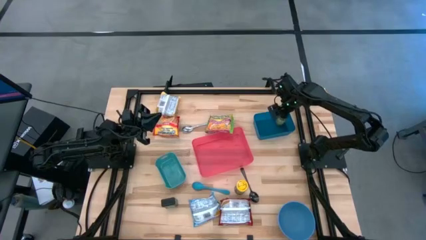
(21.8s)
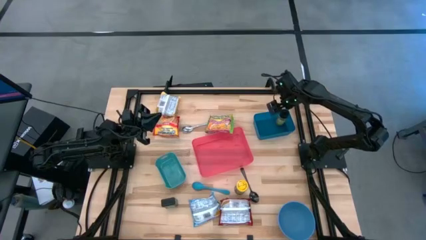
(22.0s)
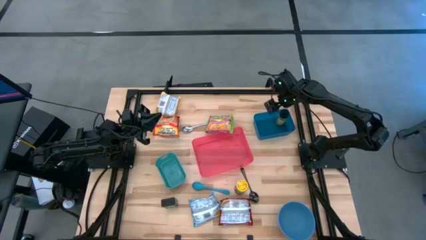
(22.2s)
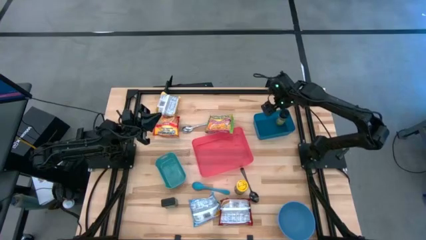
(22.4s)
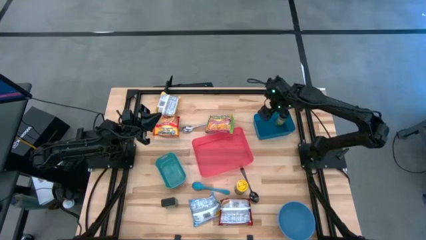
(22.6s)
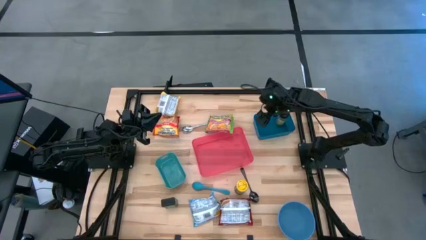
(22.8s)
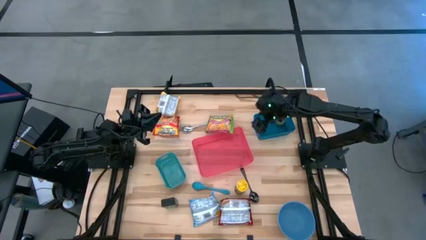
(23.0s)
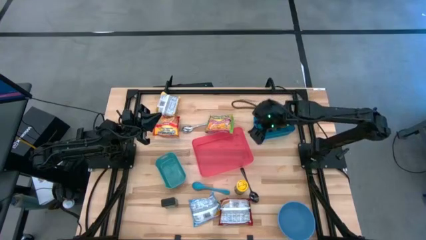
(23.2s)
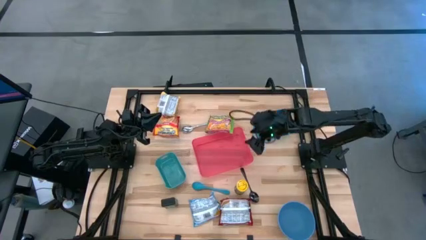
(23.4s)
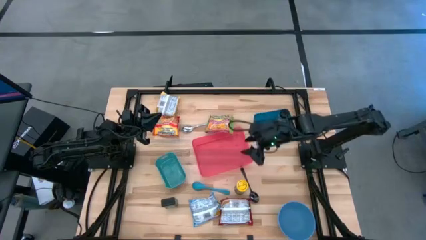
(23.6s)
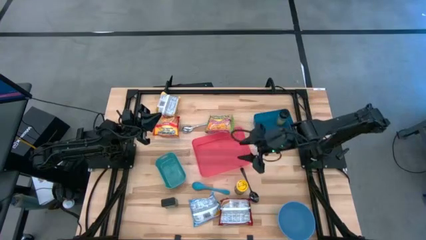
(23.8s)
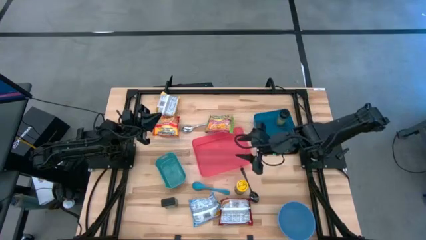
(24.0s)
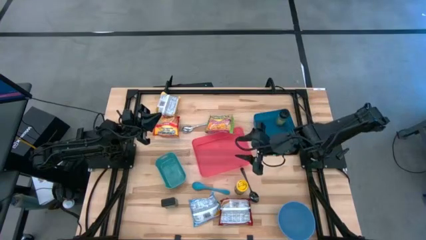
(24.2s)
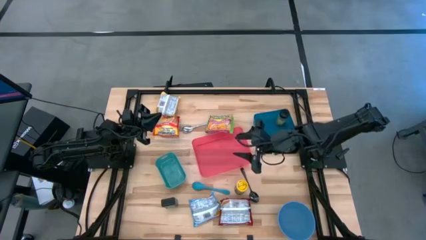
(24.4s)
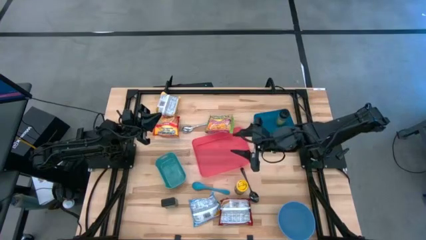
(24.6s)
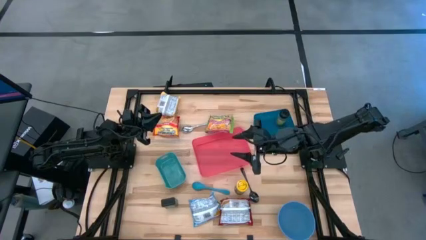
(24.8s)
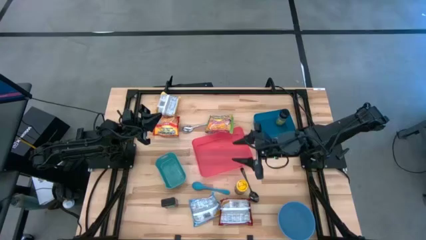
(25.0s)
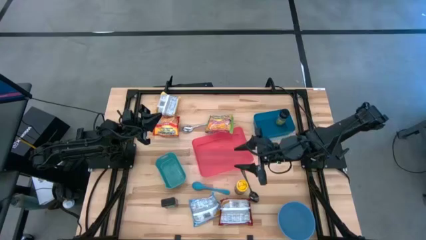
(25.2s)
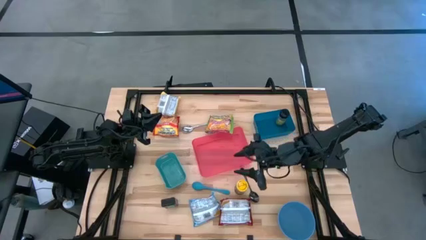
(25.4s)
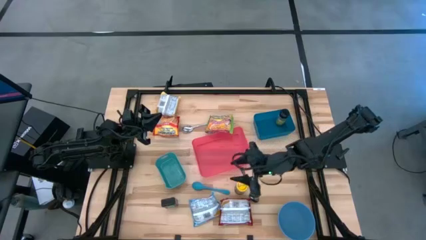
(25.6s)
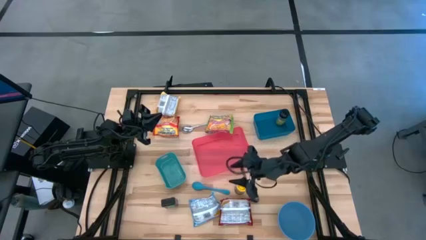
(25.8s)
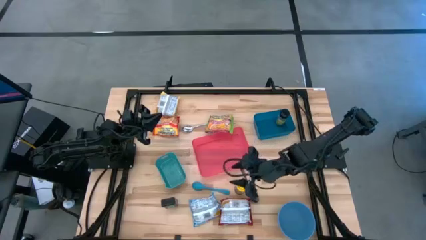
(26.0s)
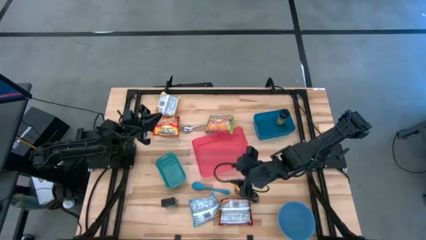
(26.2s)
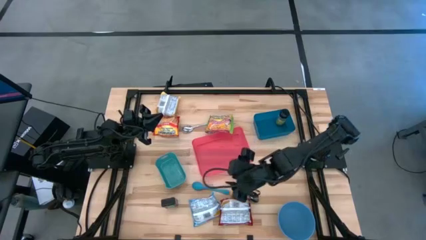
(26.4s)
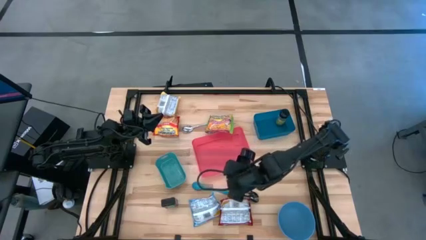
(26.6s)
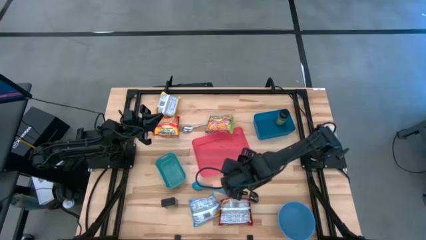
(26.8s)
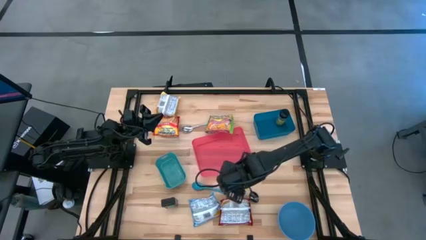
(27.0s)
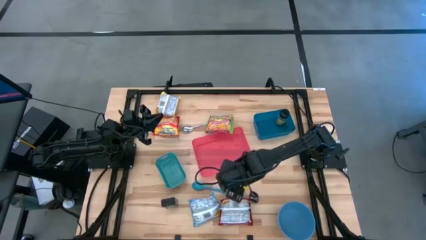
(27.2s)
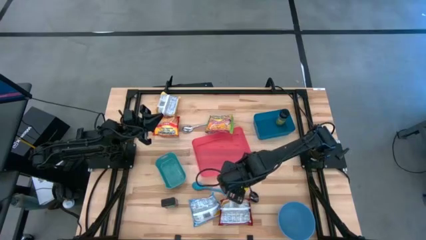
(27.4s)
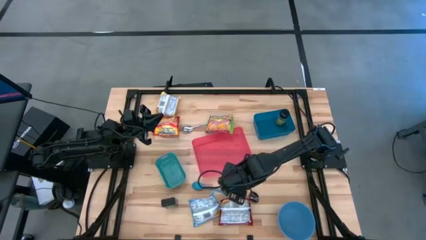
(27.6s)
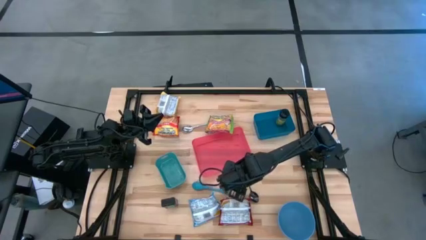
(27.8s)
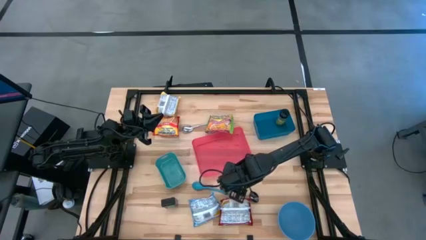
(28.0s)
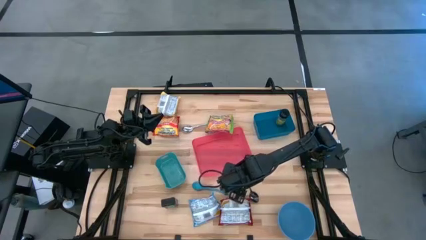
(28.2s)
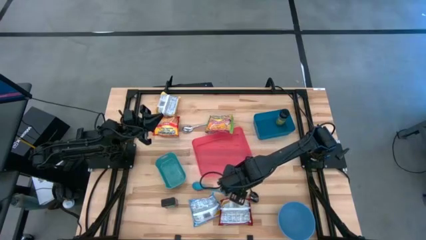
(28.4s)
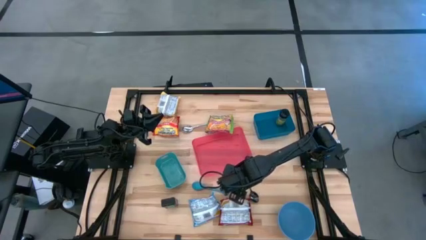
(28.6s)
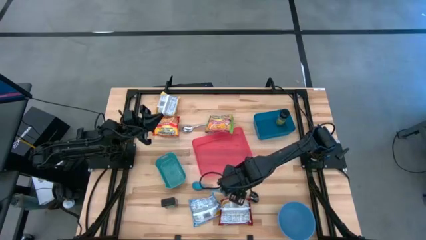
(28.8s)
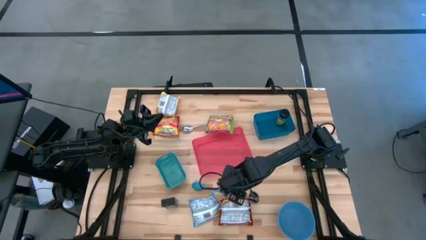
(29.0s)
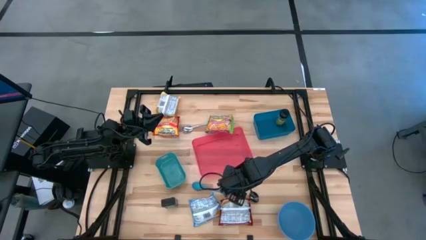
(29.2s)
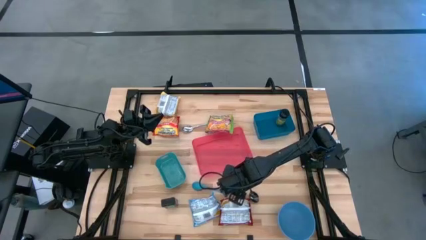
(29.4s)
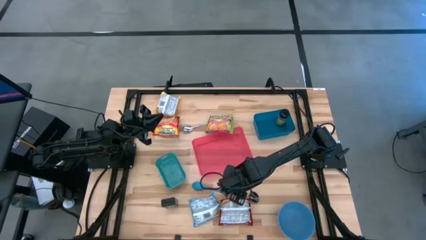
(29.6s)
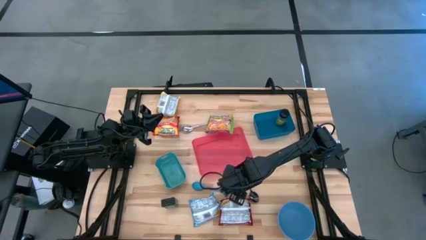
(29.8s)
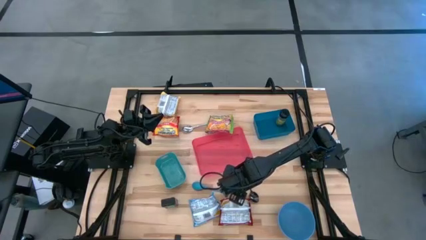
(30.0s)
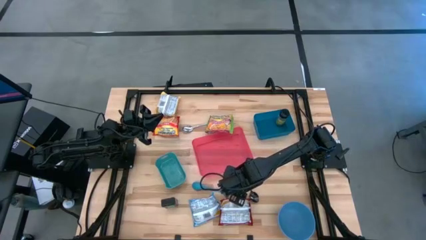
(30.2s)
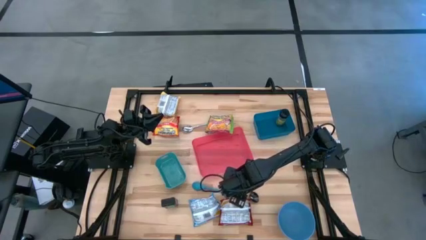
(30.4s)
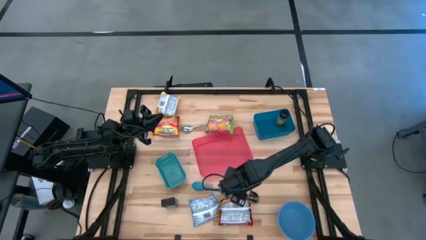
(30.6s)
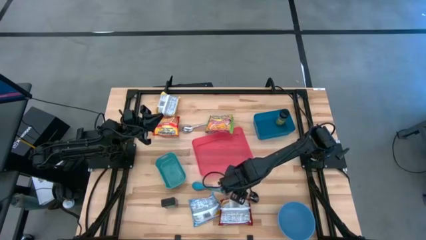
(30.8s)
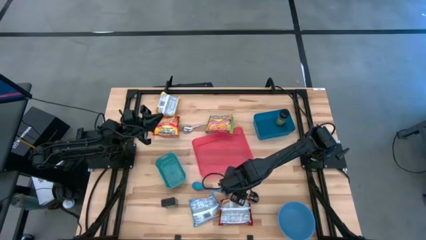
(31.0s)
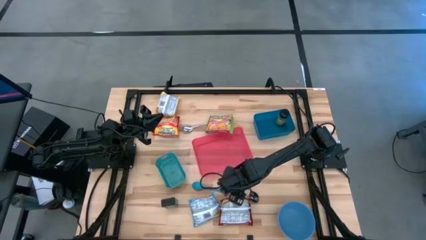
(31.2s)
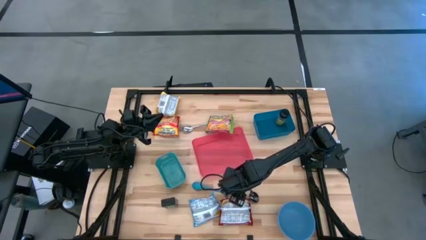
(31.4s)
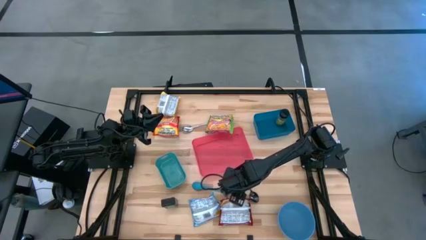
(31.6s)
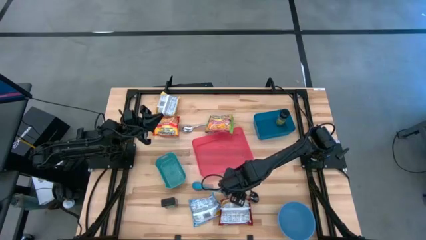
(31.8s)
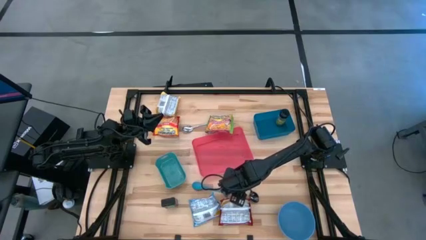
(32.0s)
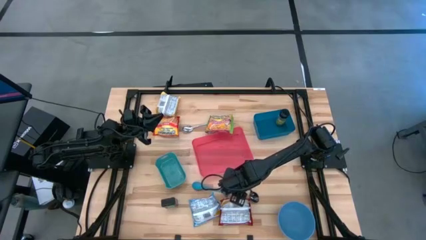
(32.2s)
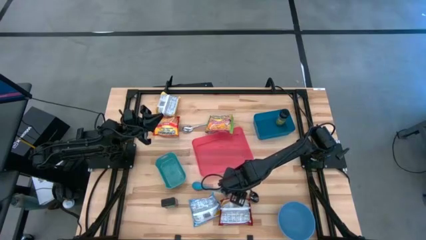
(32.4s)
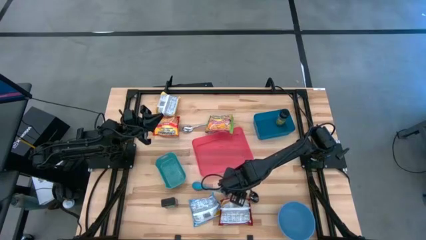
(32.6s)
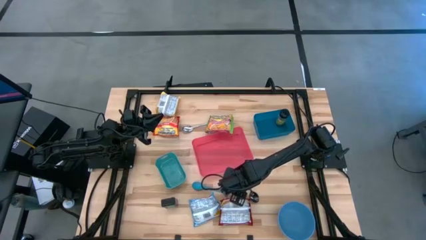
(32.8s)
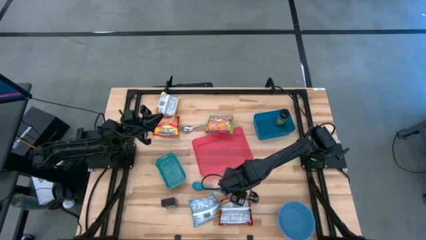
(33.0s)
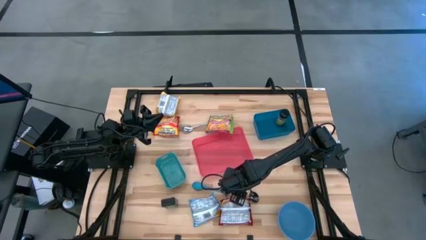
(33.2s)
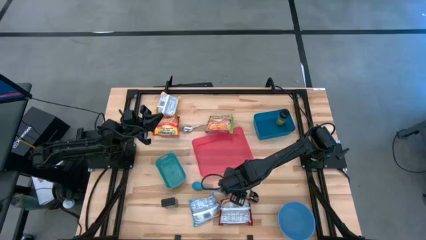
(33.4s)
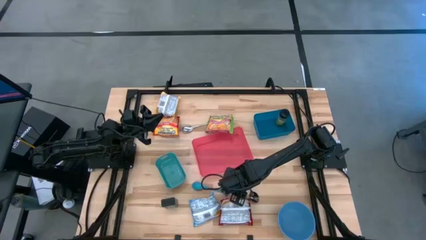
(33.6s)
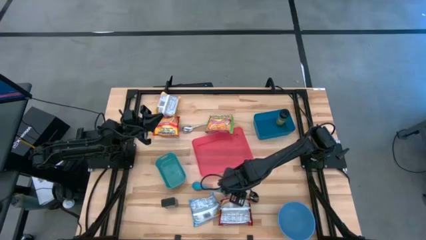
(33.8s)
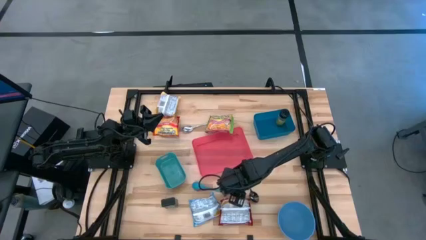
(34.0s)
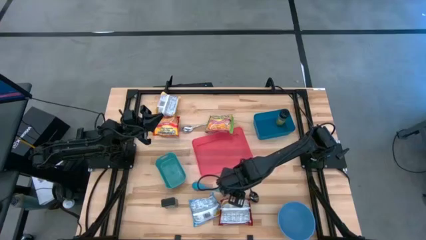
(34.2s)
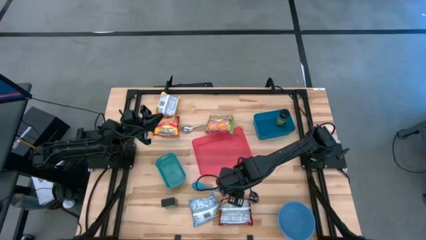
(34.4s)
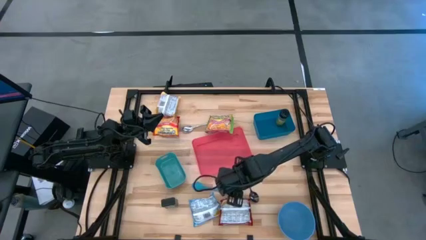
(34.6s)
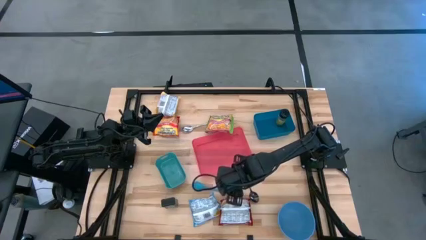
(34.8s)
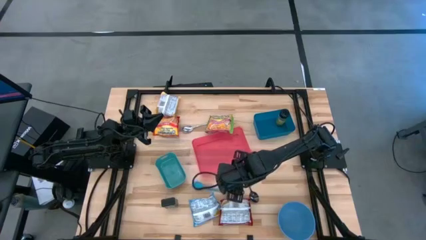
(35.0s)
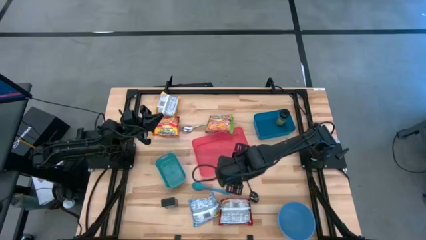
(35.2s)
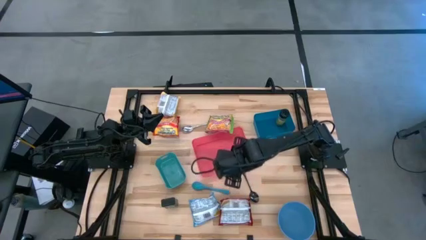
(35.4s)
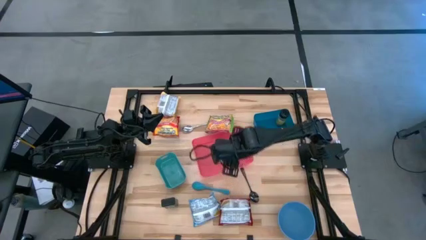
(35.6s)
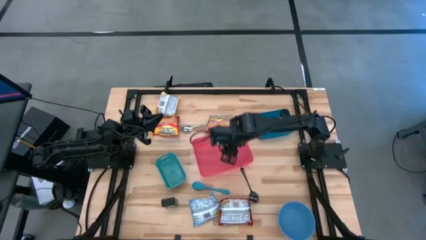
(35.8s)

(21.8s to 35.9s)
Task: Pick & Place Food Item
Put the yellow seasoning bottle into the blue bin
